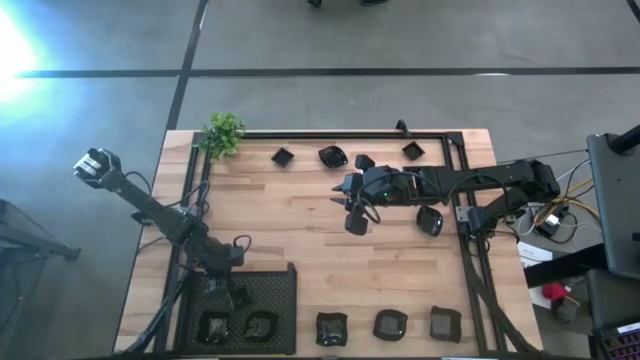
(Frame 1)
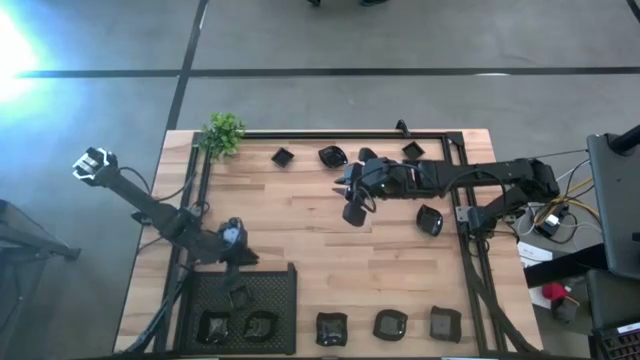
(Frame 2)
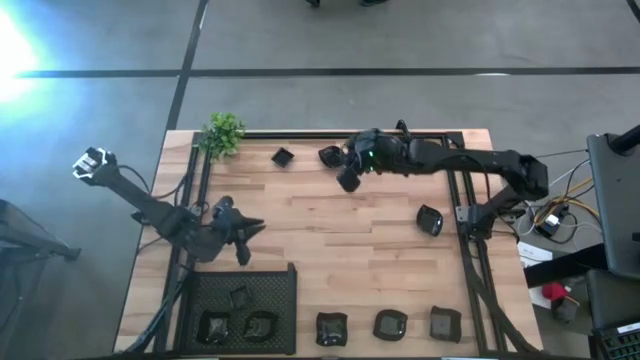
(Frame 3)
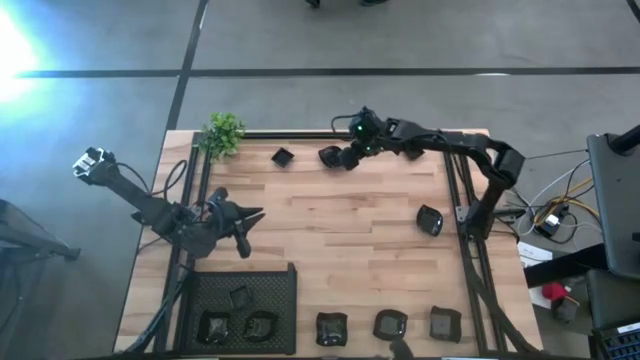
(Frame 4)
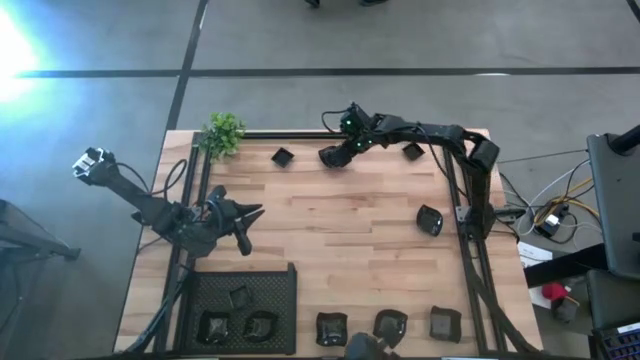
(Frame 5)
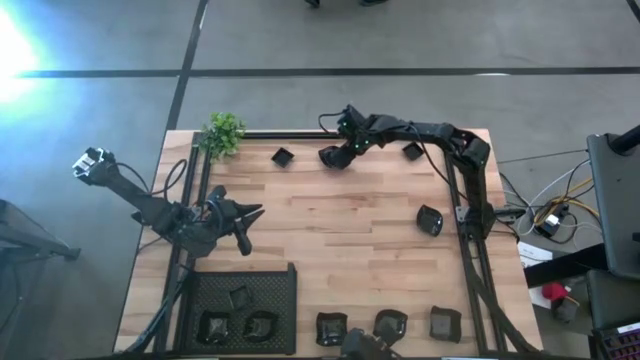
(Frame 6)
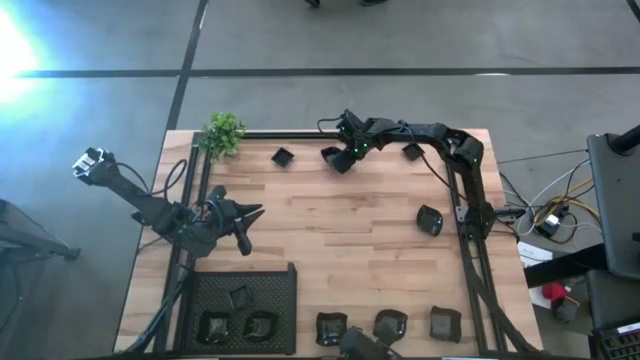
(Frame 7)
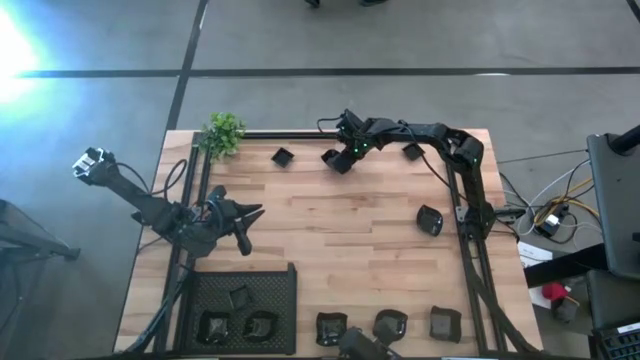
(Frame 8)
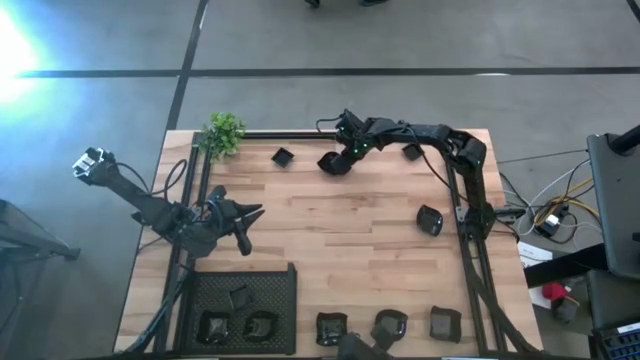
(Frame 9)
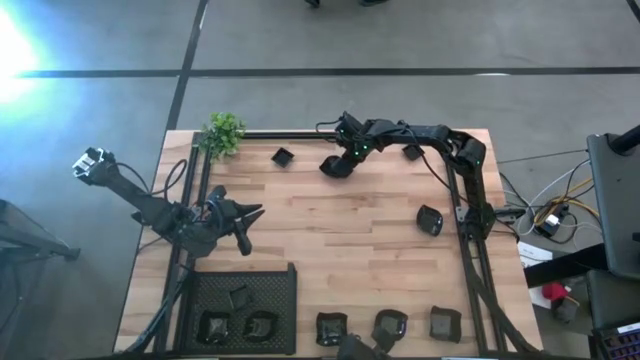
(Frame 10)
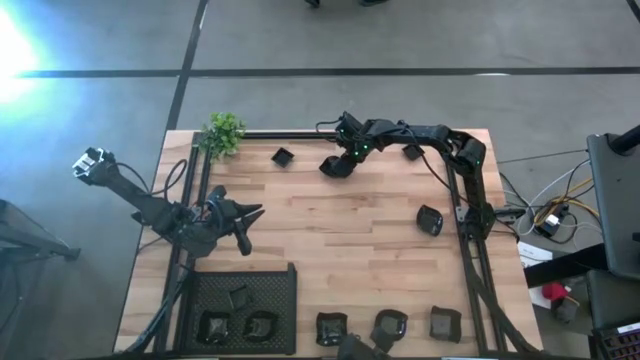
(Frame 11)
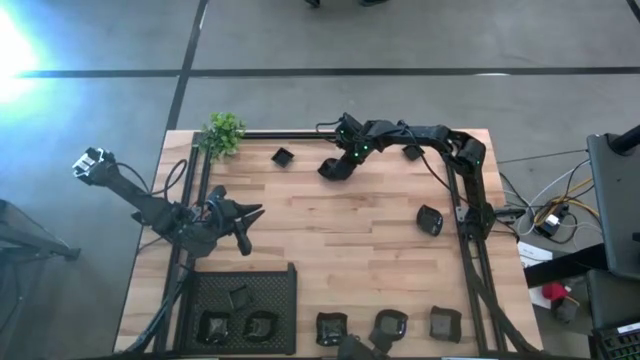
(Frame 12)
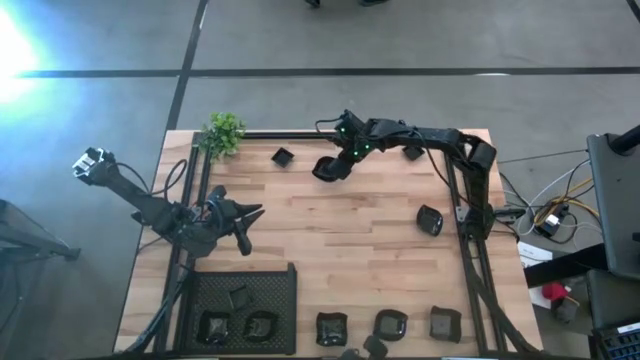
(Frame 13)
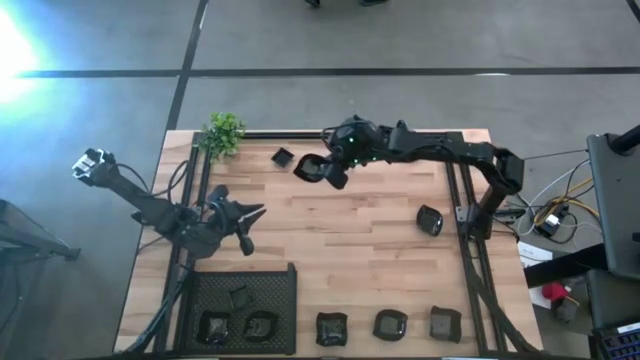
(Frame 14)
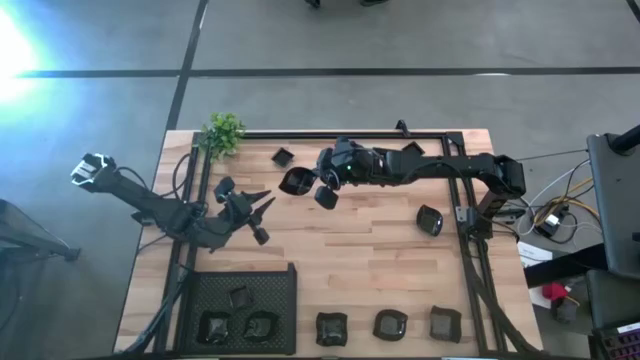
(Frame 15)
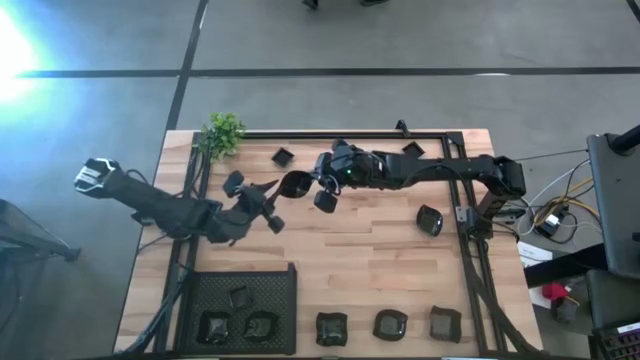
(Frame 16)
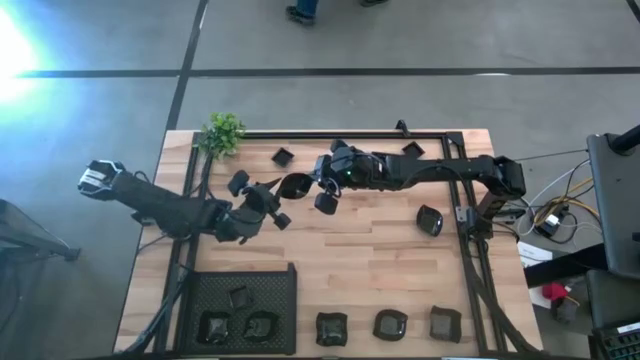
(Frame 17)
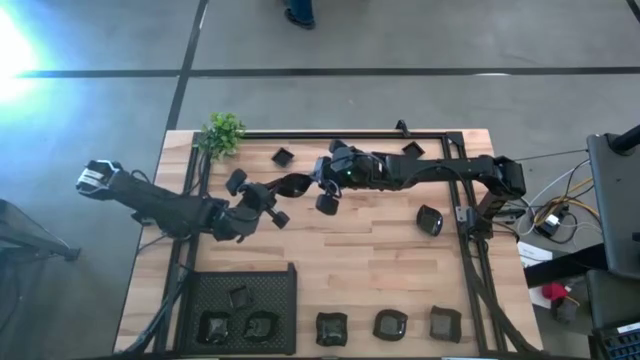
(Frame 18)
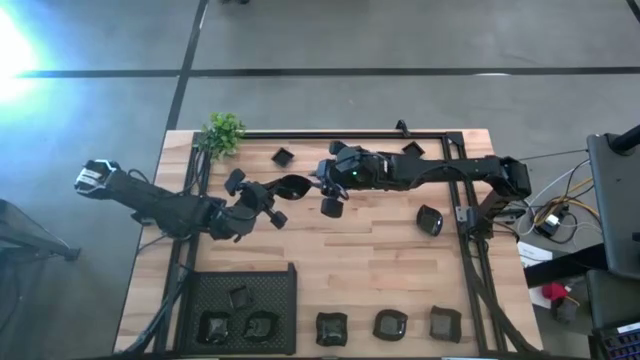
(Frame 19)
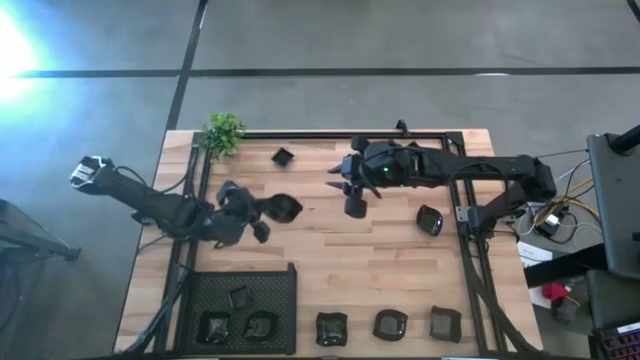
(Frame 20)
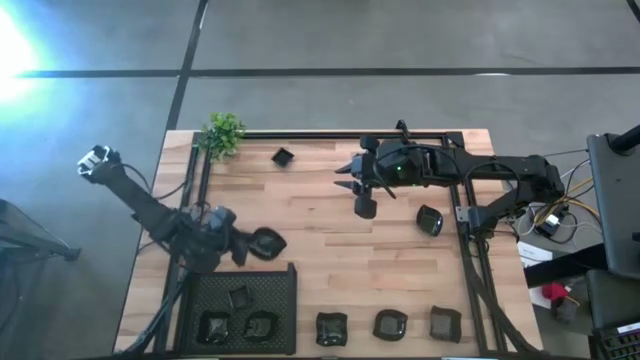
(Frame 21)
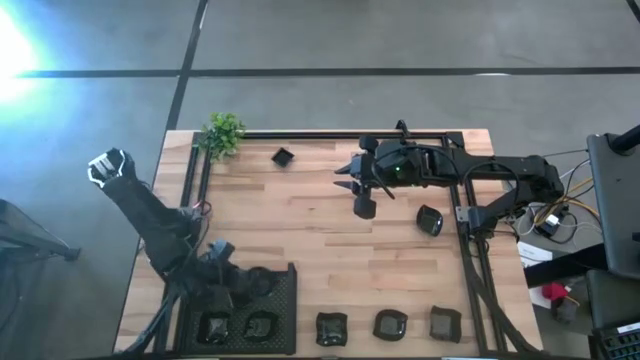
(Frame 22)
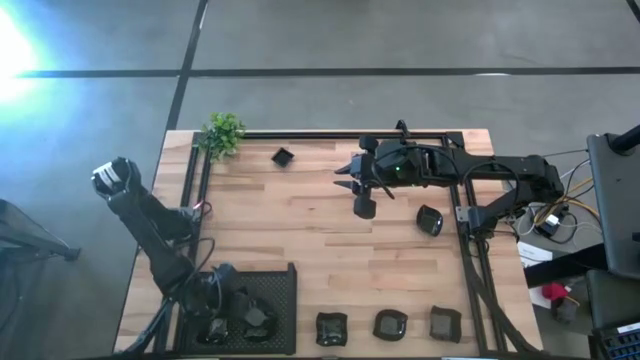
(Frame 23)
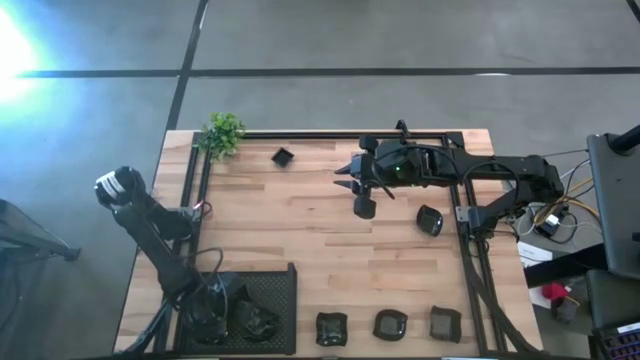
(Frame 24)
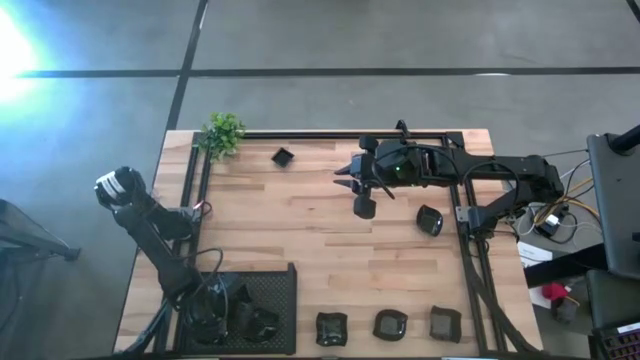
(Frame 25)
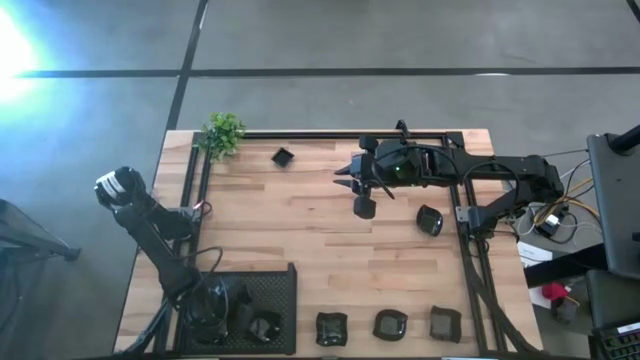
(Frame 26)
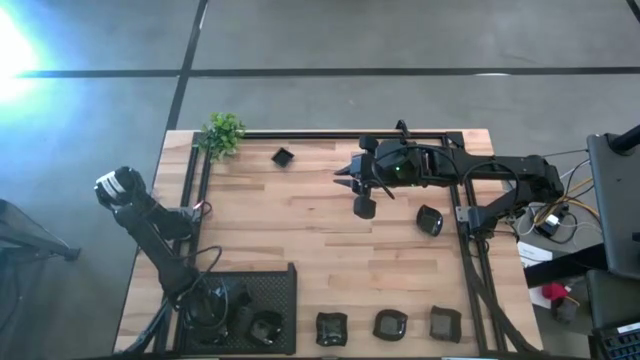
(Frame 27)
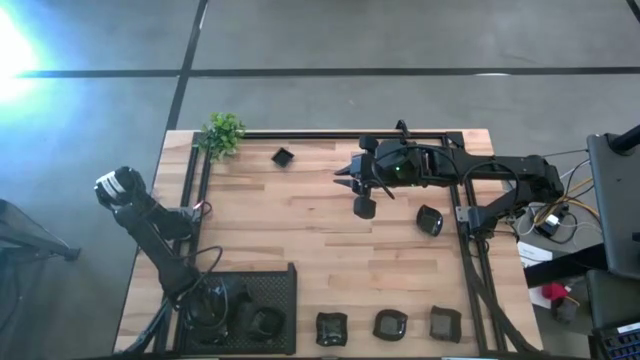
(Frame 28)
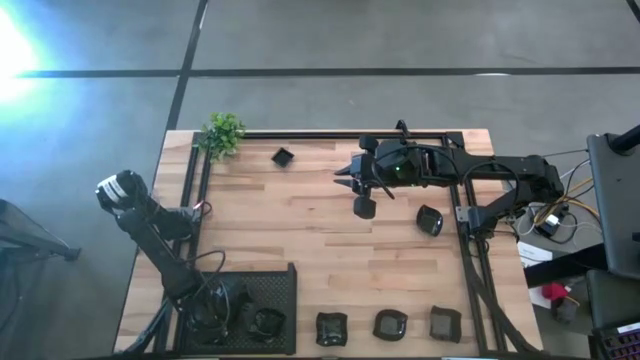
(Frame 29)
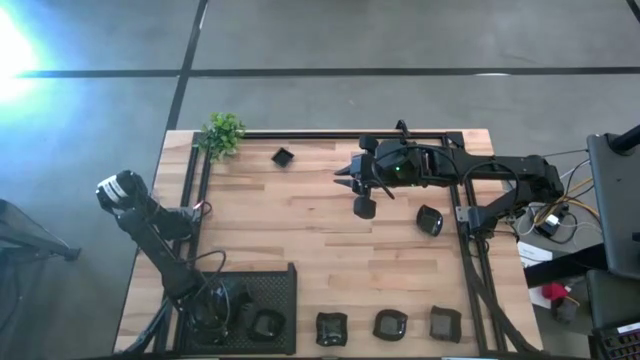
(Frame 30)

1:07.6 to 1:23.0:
Task: Pick & Place Mini shaped plates
Stack the leaf shaped plate on top of the leaf shaped plate on the shelf

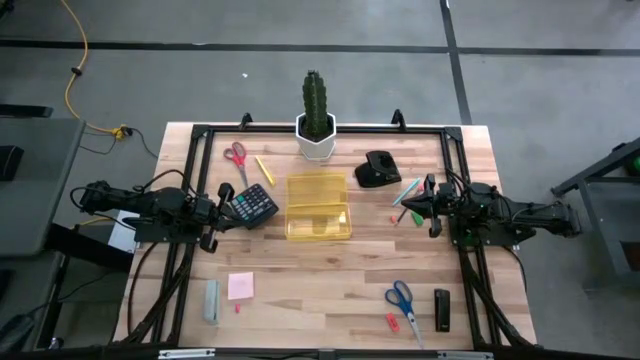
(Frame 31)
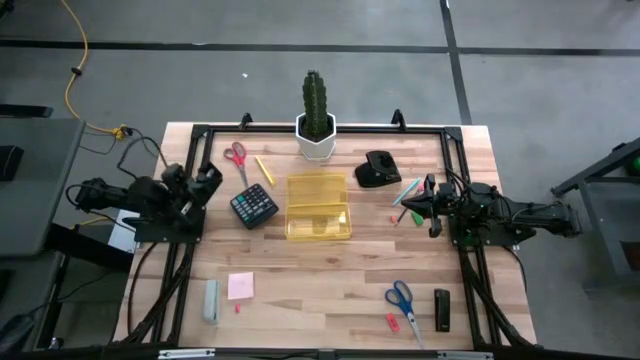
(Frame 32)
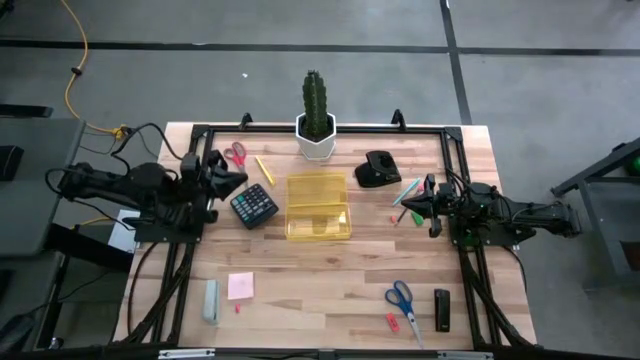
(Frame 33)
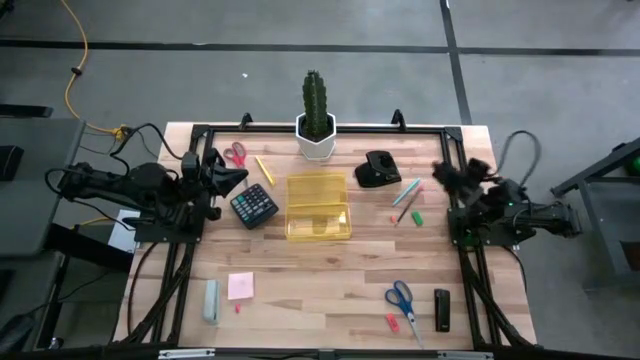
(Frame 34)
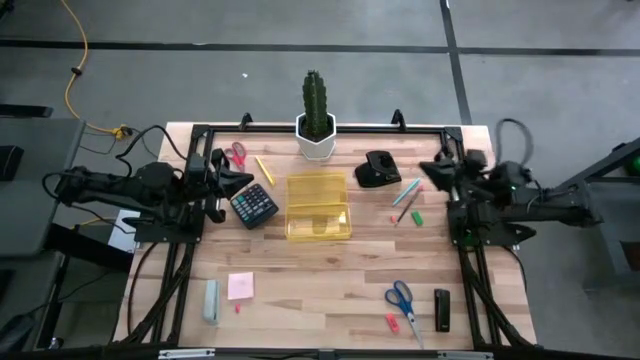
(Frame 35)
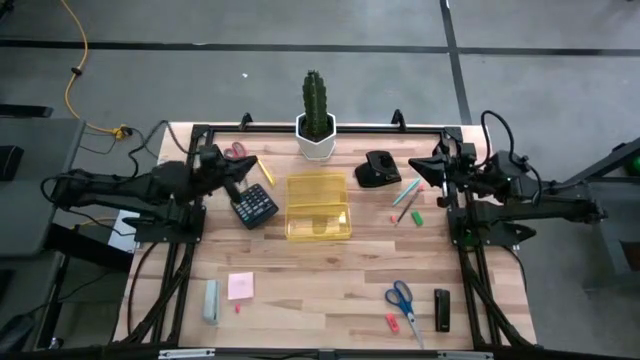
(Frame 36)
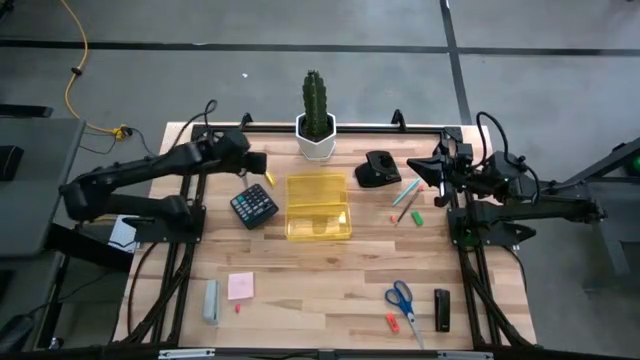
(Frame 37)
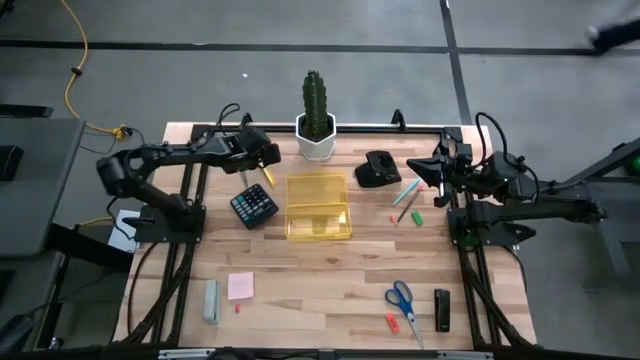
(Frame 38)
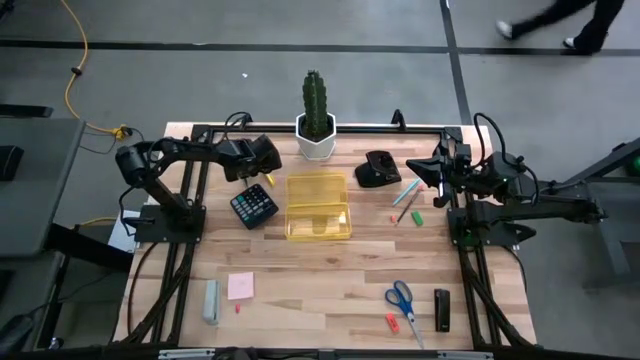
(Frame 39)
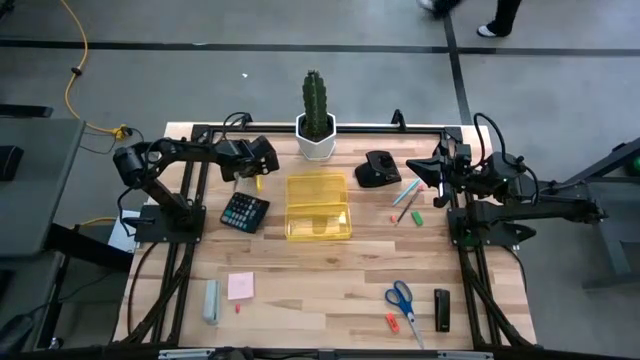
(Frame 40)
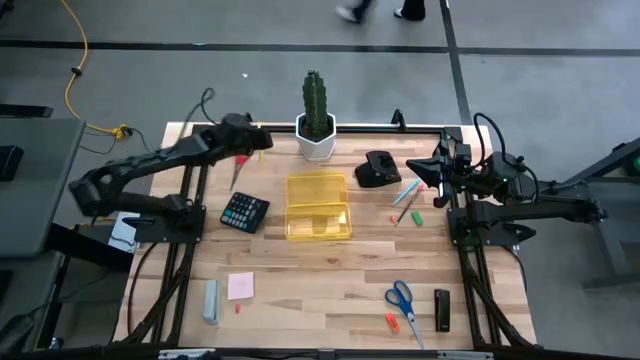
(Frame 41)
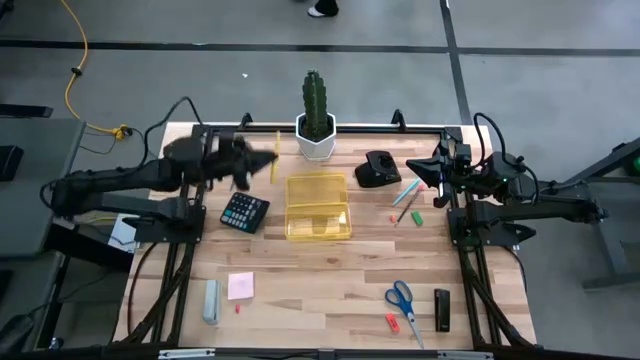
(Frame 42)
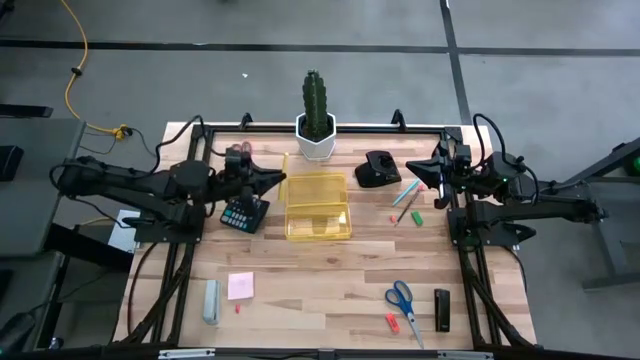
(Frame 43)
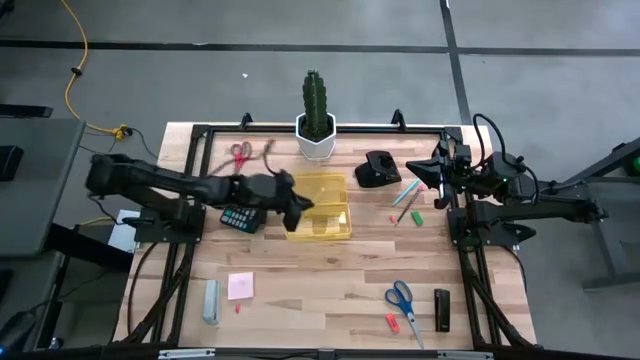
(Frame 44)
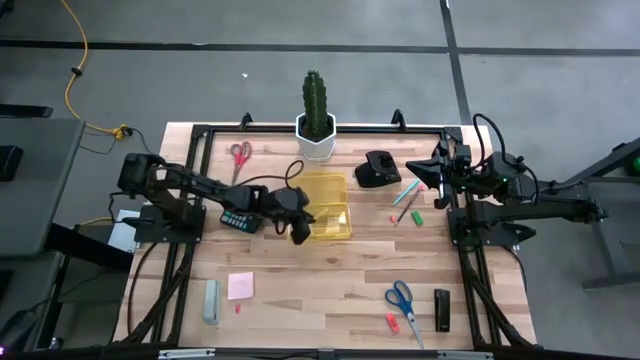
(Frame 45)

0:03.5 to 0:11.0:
Task: Pack school essentials
Put the yellow pen into the supply box
